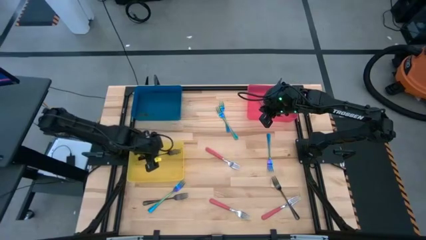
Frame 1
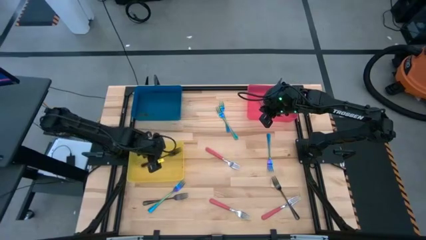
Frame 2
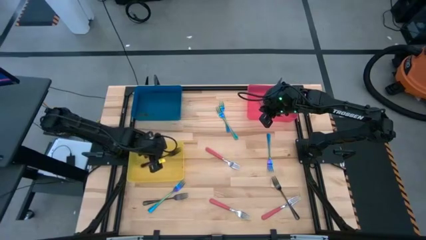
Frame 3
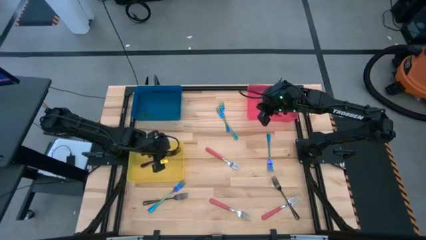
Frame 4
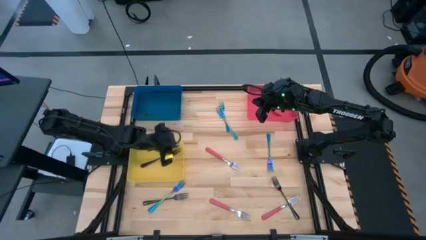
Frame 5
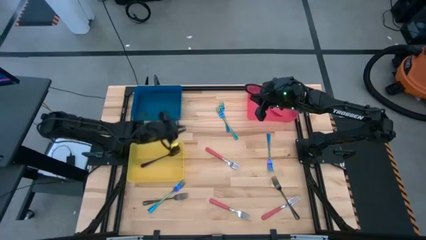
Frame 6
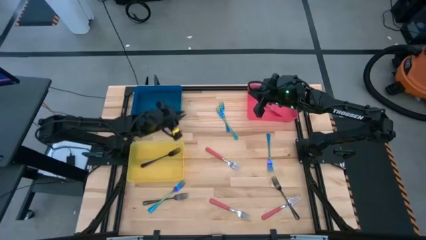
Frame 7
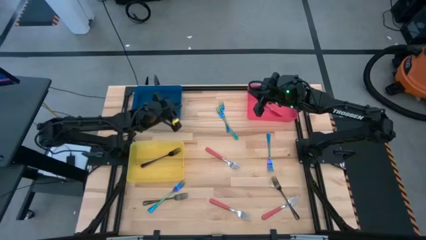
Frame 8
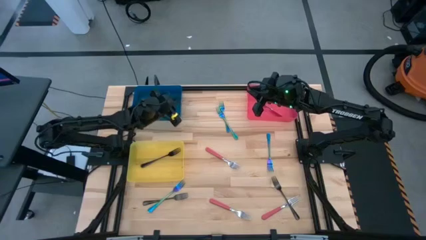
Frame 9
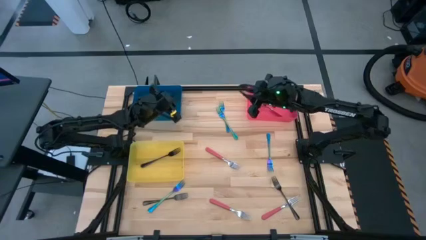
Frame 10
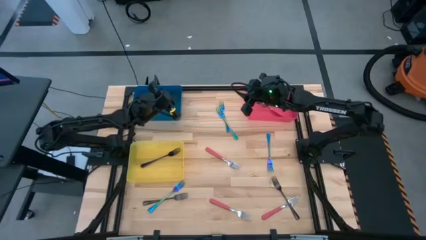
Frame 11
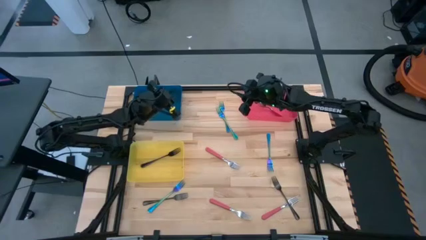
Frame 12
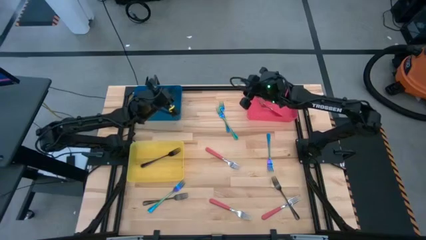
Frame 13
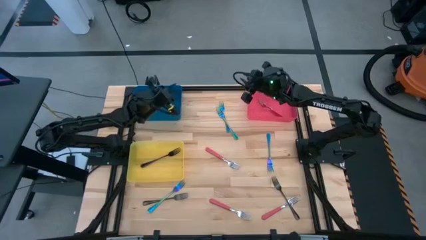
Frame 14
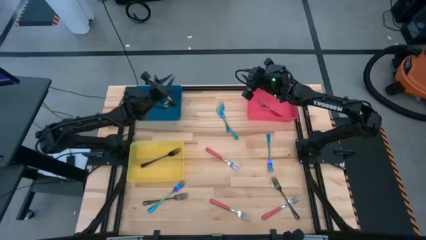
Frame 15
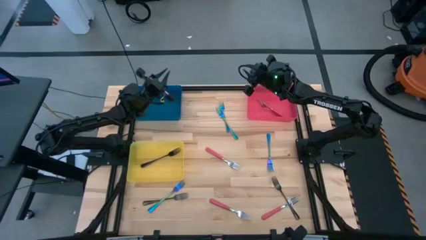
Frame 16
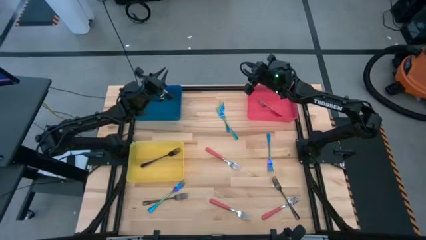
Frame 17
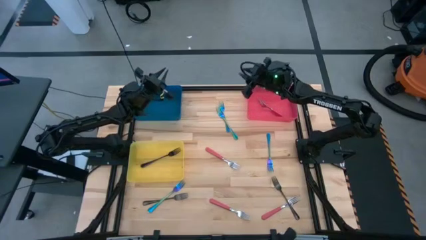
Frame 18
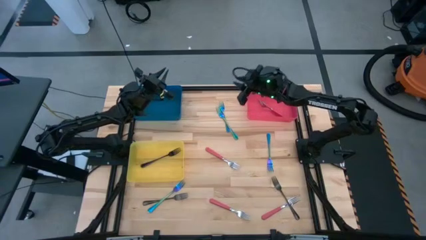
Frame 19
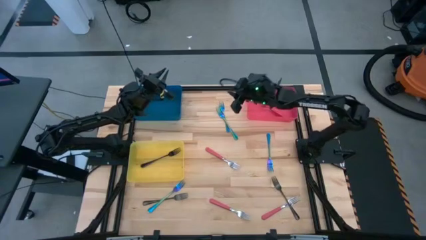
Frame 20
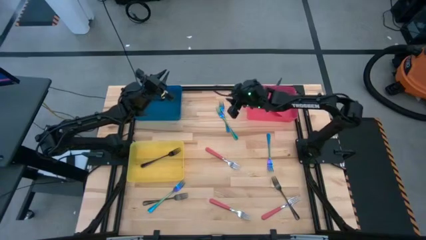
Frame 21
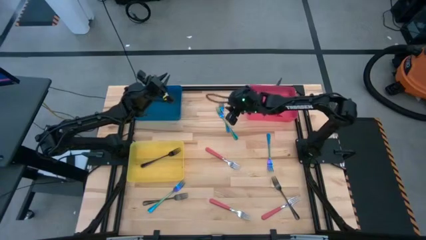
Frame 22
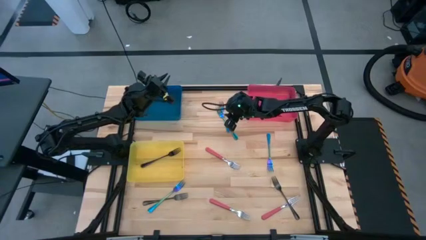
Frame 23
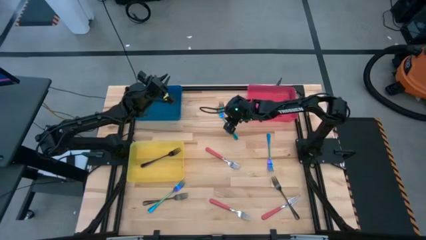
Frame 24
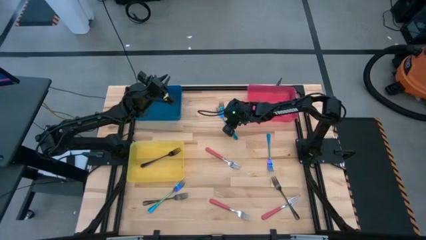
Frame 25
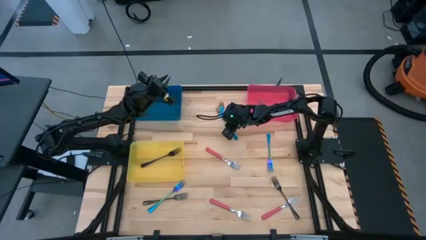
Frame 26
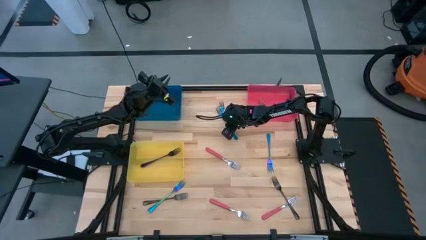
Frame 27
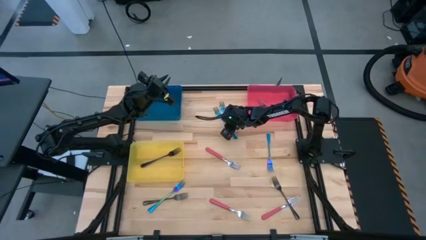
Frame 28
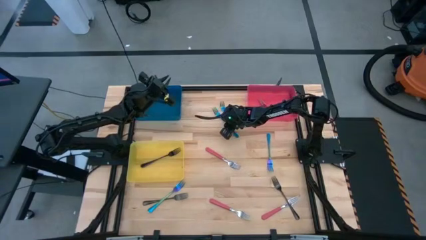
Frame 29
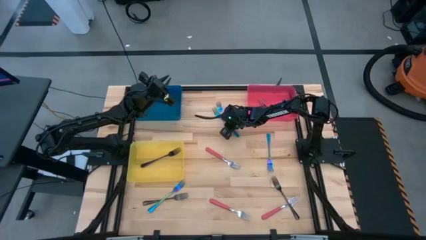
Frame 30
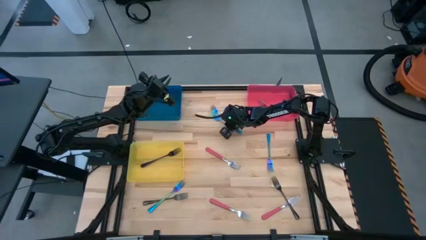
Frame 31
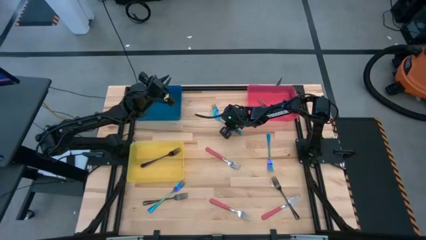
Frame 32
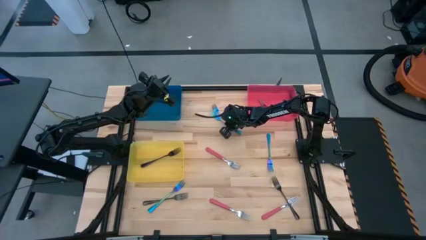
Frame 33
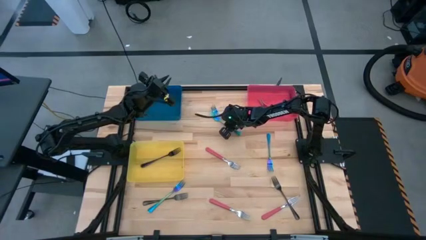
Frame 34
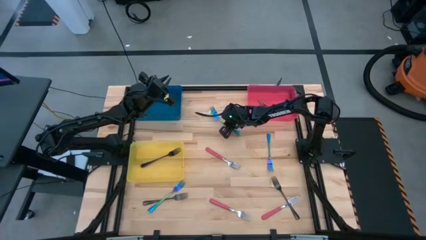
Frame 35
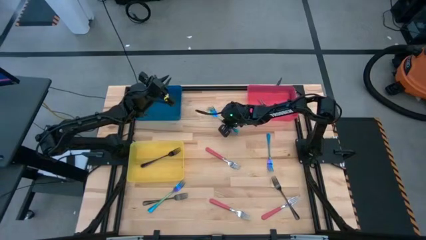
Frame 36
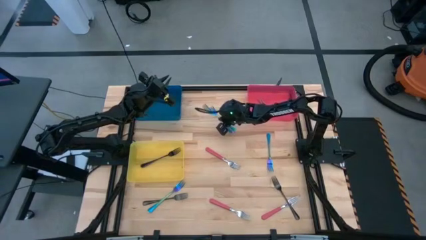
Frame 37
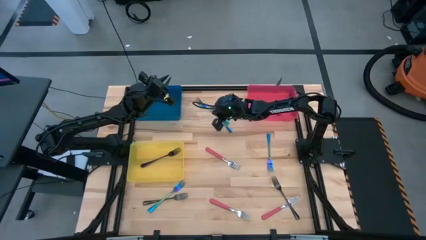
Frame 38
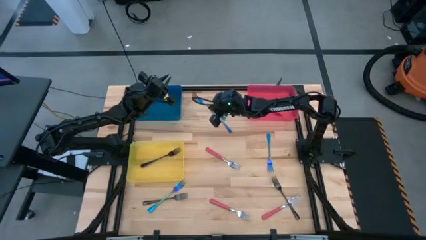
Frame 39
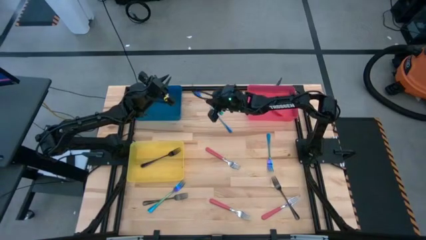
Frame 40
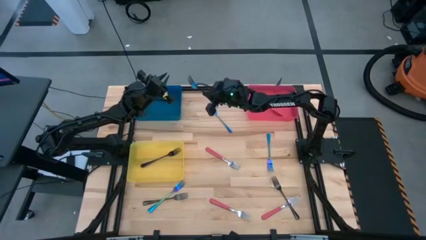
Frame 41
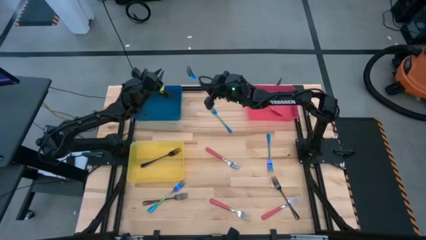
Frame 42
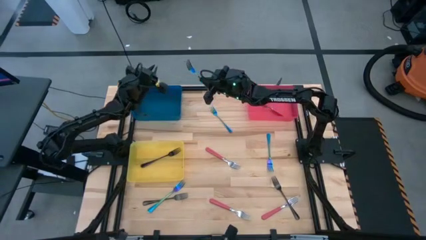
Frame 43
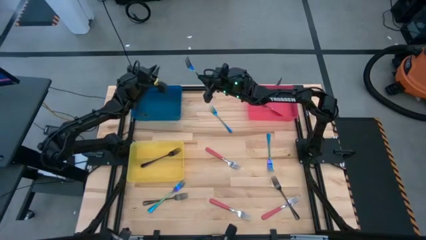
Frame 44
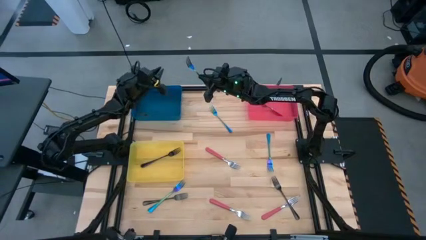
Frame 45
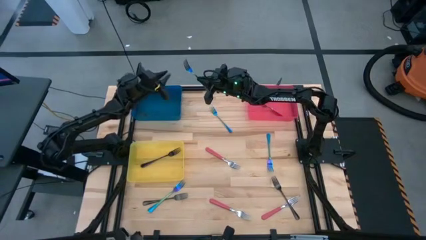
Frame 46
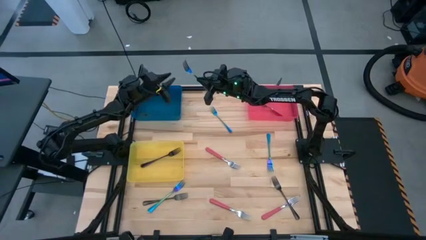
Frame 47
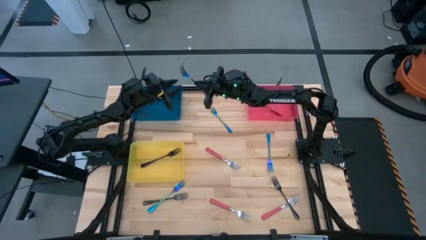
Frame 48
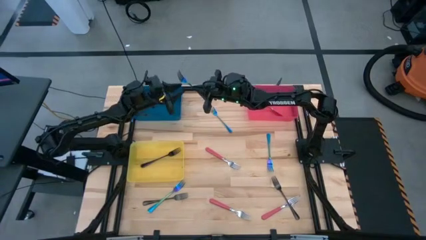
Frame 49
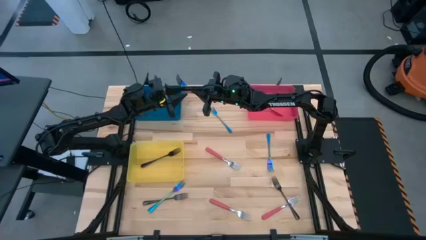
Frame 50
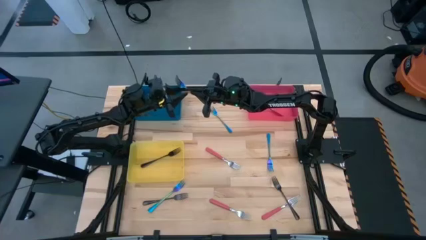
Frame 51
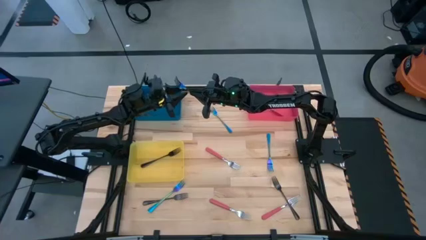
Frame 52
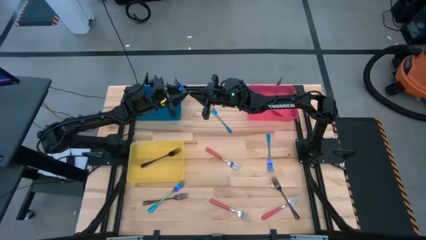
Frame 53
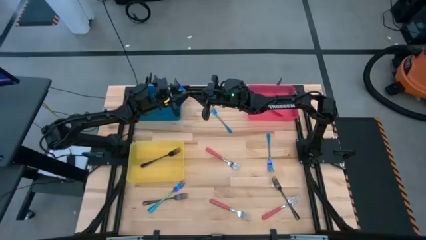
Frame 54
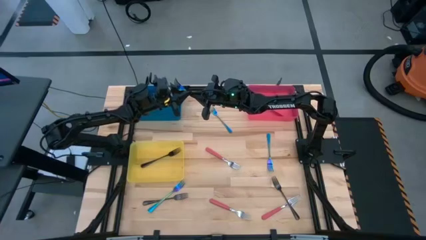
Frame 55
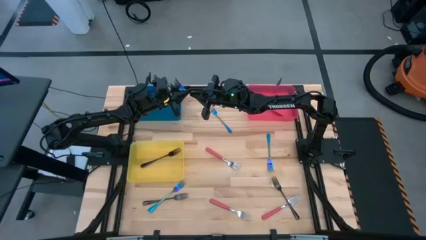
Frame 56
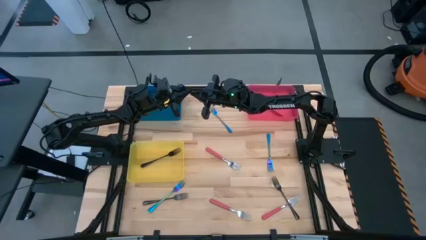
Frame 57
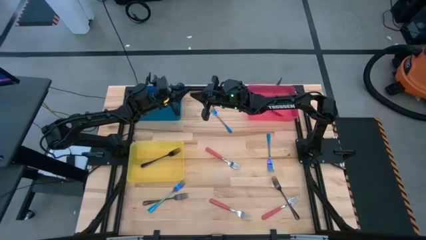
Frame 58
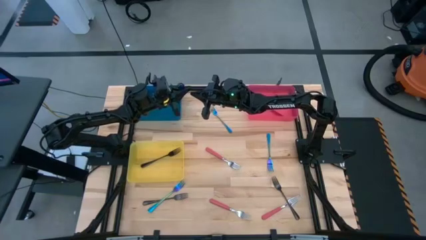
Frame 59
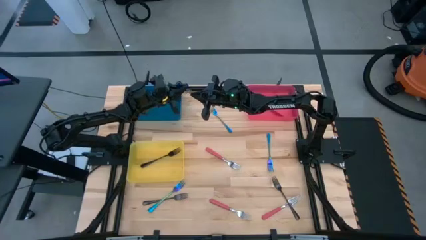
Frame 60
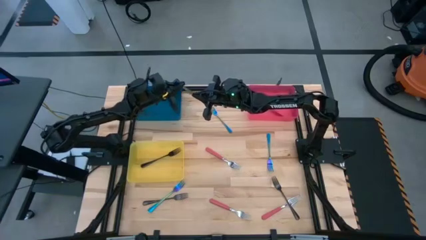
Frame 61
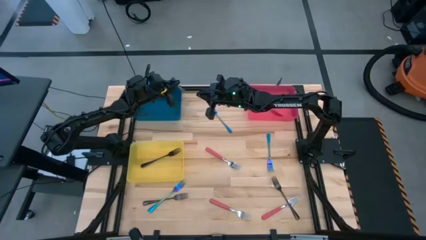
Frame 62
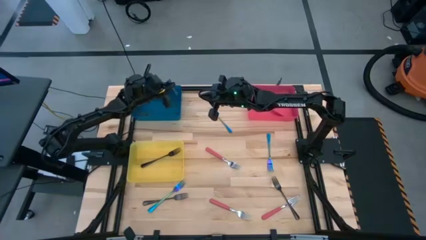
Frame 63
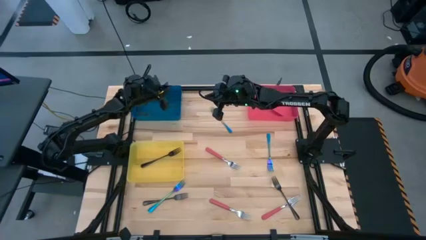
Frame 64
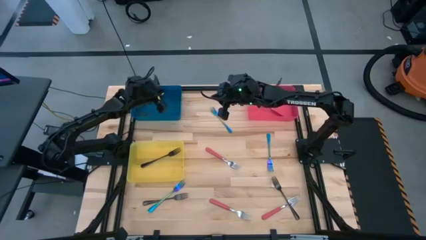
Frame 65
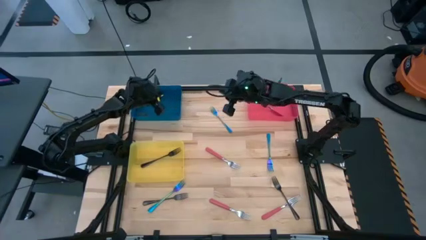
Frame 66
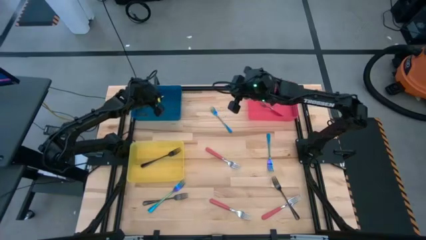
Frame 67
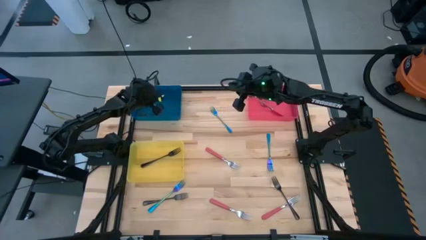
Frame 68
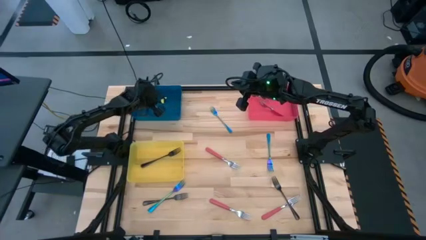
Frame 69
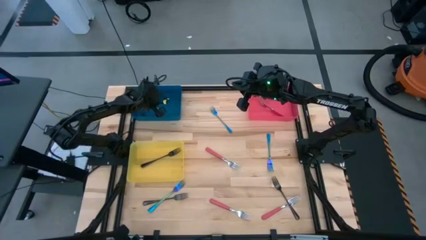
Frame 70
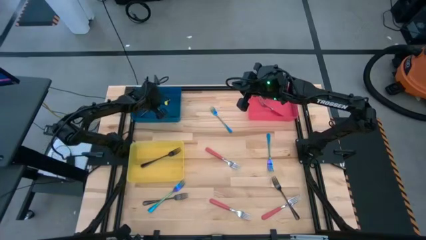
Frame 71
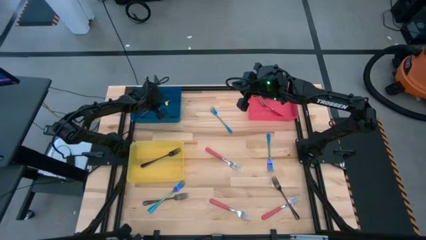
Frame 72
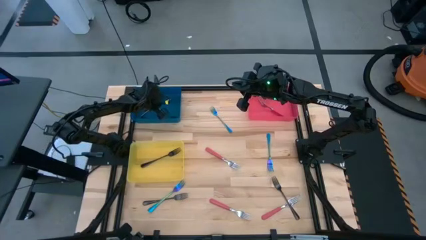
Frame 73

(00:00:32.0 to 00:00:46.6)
Task: Sort silverware by color (type)
Put the blue fork into the blue bin
